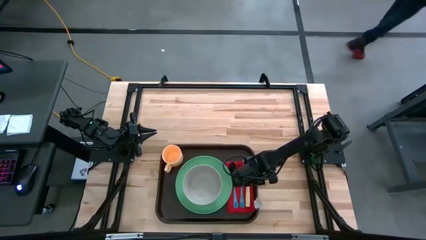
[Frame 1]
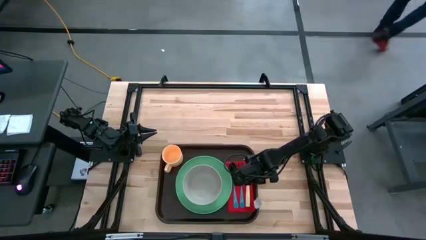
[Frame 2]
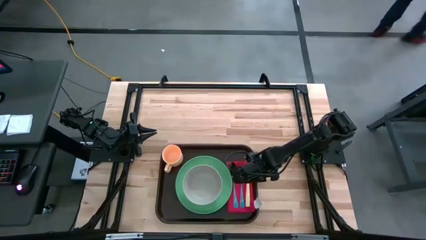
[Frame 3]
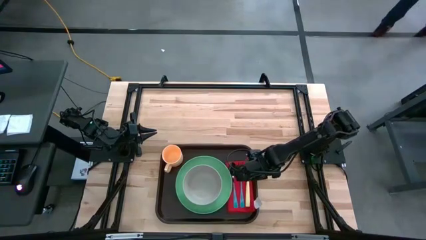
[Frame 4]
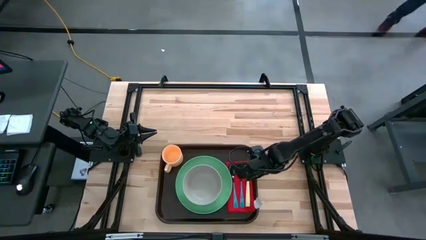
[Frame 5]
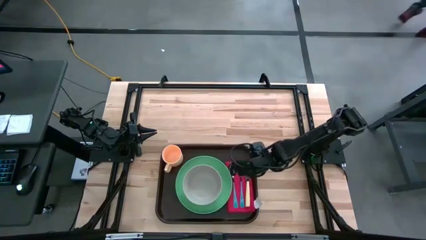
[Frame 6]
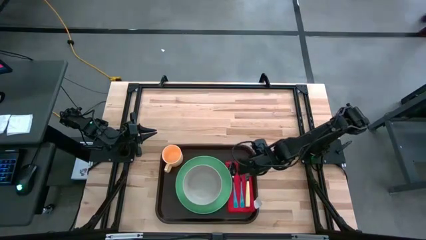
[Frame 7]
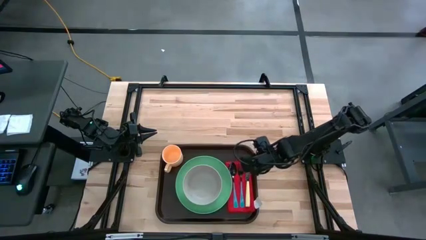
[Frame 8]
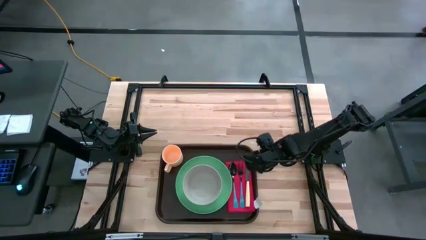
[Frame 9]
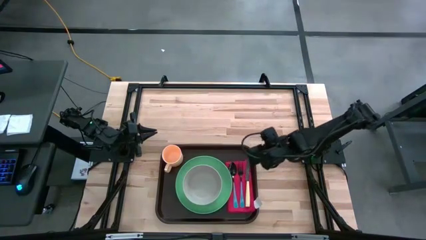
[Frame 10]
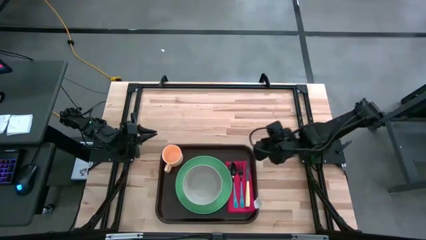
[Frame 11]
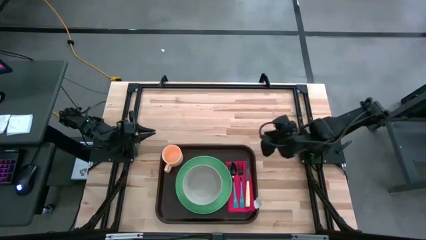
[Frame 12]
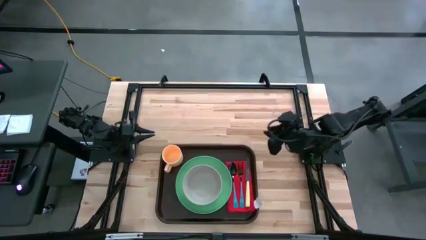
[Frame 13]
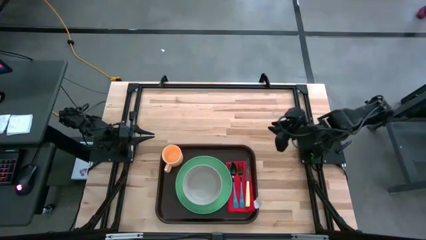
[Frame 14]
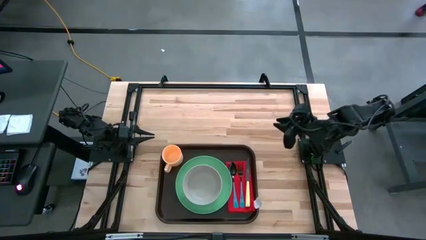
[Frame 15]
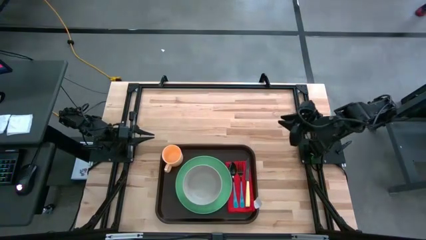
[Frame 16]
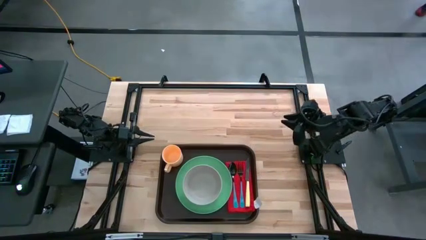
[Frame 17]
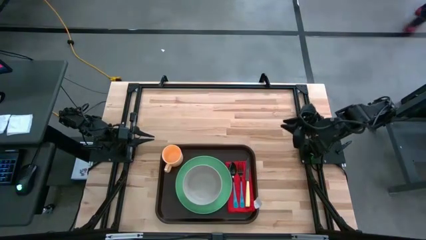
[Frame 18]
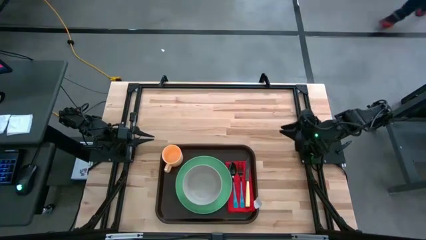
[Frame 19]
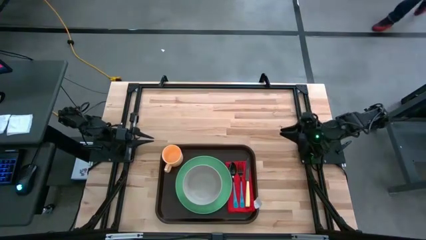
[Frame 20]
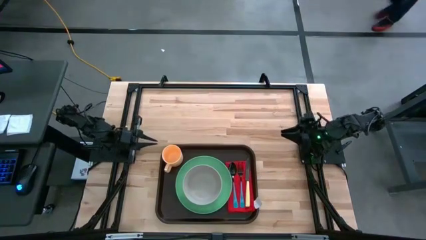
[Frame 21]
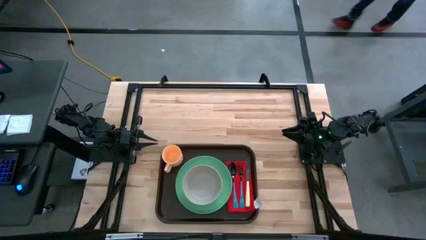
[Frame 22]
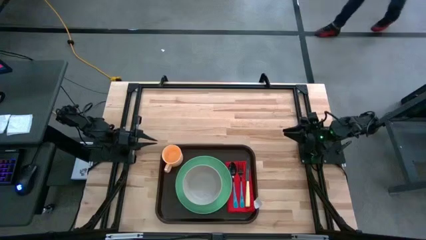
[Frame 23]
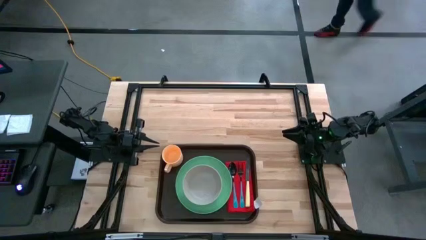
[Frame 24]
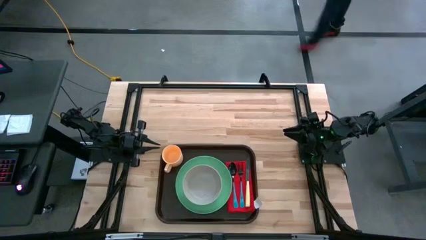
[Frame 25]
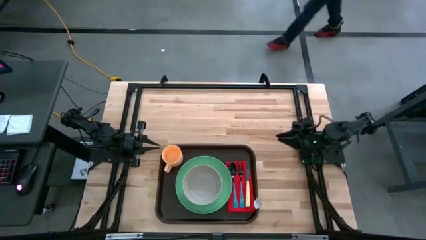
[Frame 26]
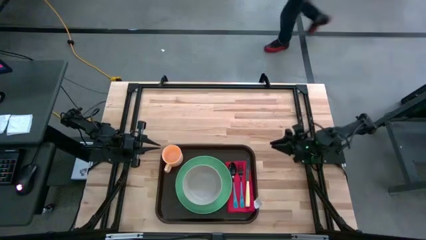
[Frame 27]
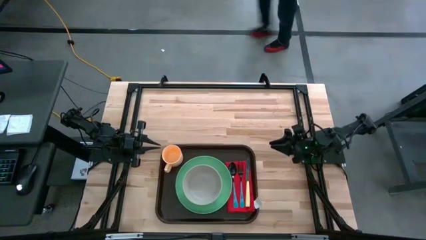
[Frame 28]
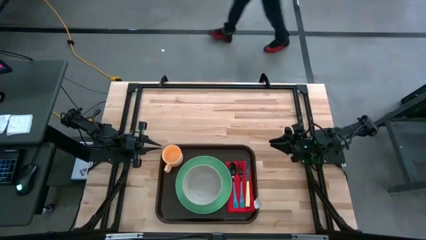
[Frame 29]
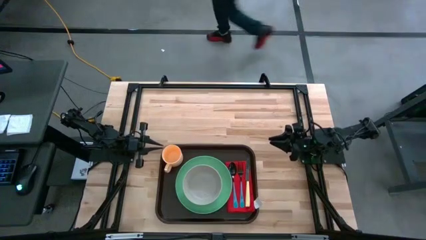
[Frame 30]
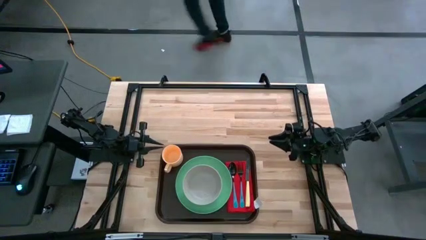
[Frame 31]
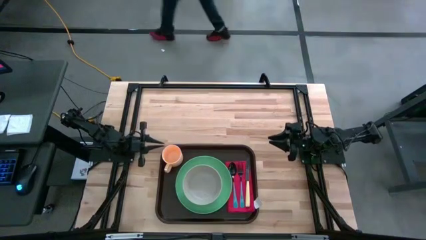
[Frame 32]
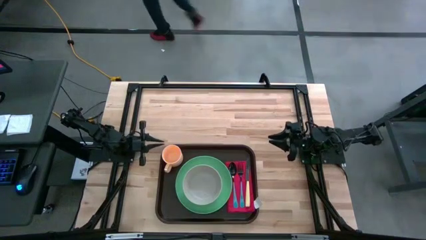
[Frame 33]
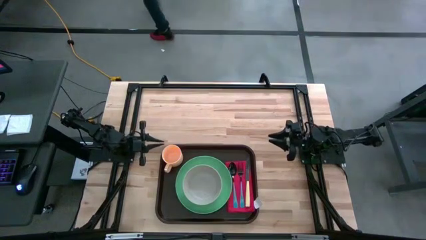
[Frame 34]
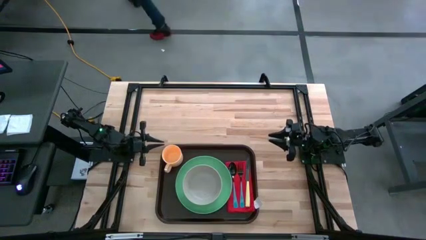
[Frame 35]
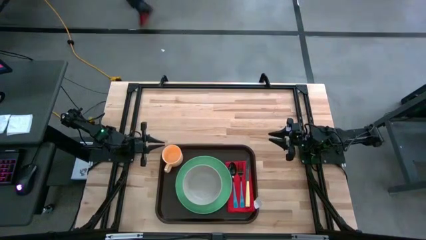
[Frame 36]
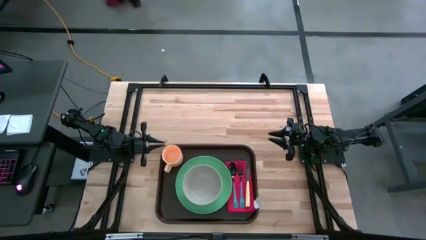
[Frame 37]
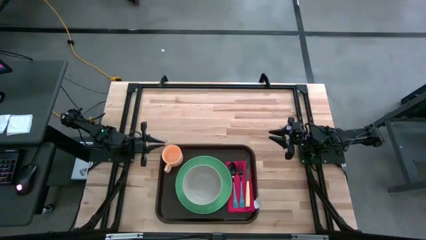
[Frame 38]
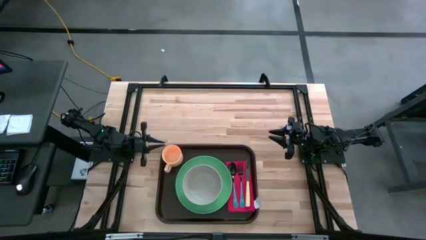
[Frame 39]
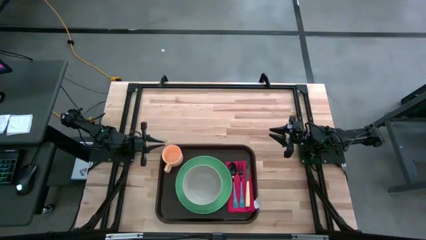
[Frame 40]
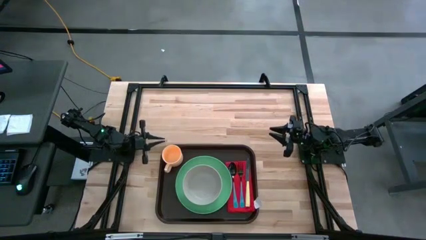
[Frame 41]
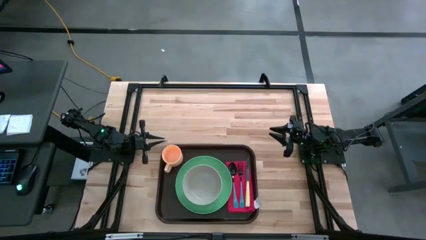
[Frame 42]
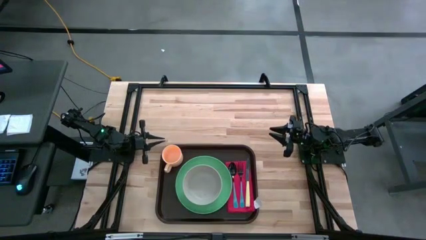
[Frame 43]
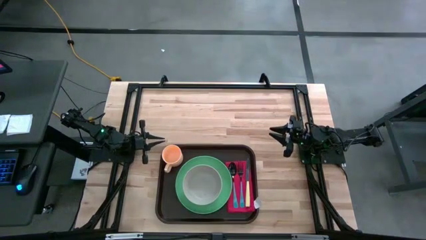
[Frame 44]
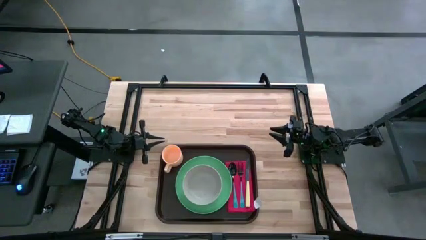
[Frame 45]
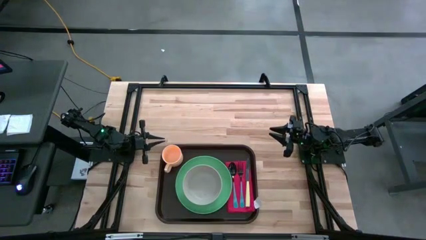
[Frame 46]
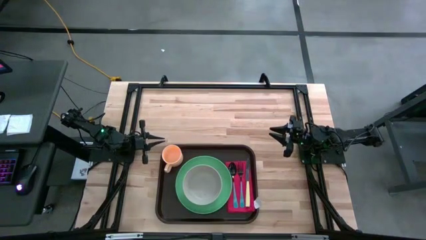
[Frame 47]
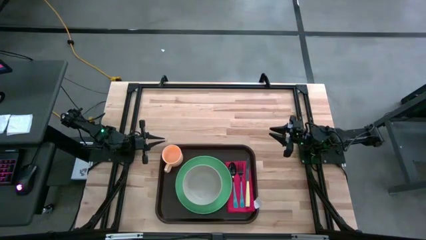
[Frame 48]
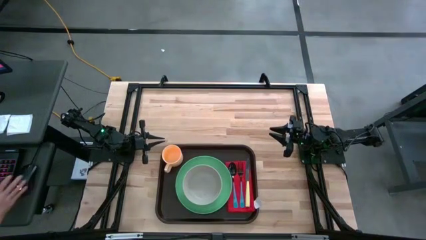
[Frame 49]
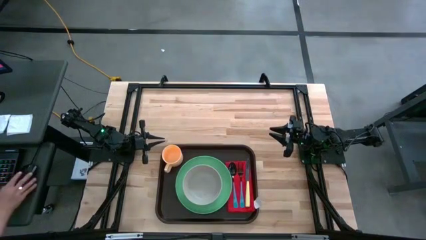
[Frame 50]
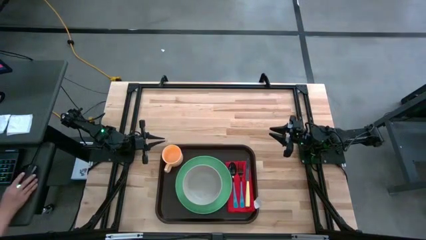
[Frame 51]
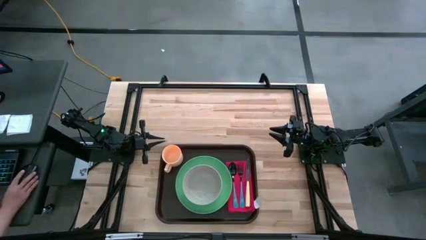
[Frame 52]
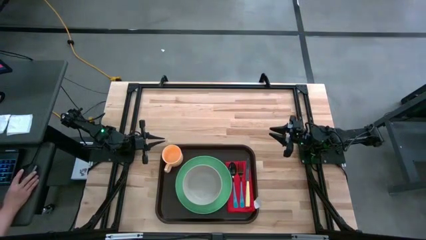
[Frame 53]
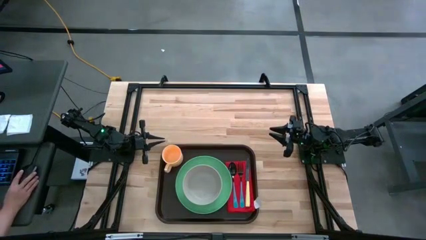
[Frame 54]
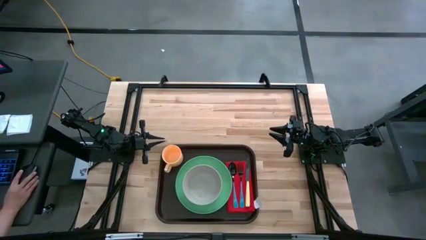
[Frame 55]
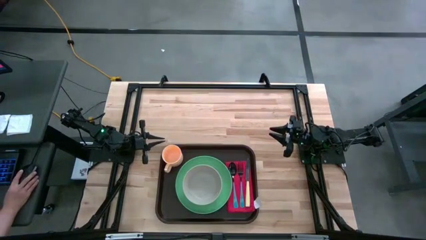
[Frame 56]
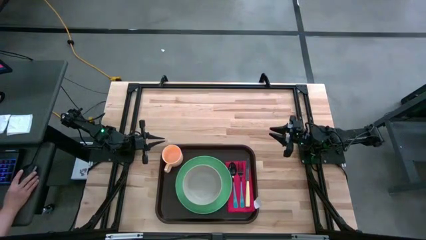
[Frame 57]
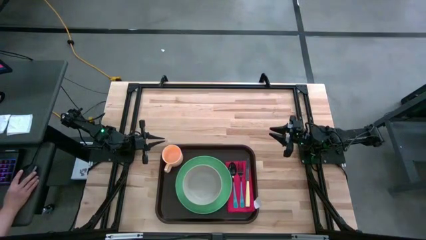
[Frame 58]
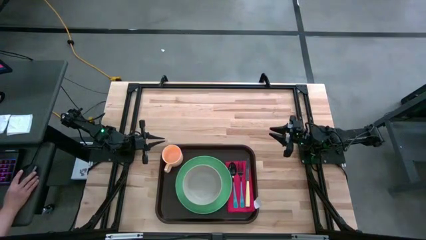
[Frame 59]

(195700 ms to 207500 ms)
Task: Set up tray
Return to Home Position

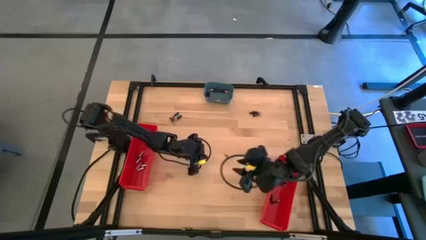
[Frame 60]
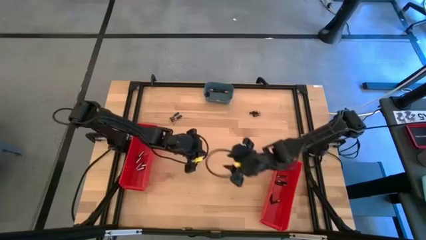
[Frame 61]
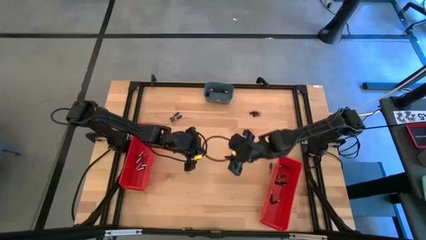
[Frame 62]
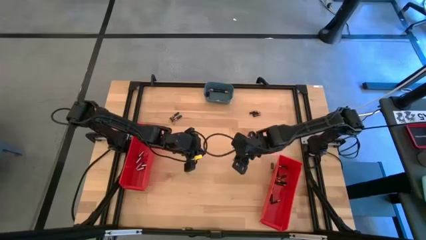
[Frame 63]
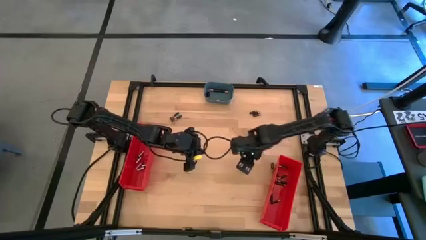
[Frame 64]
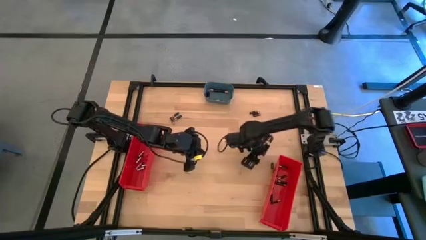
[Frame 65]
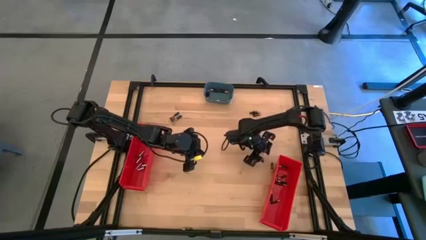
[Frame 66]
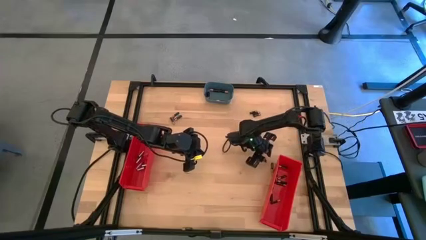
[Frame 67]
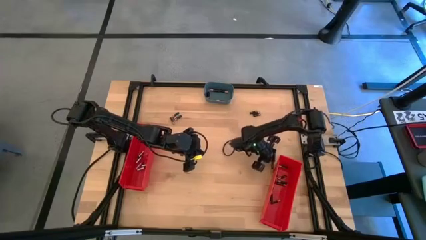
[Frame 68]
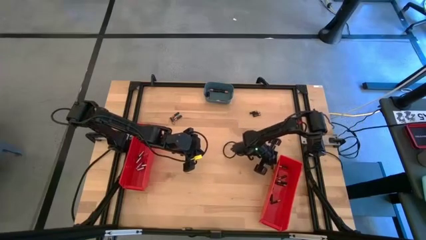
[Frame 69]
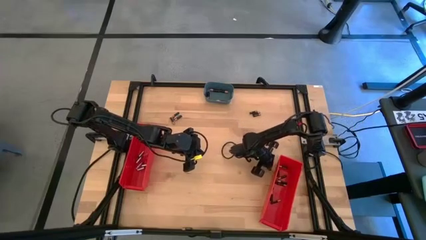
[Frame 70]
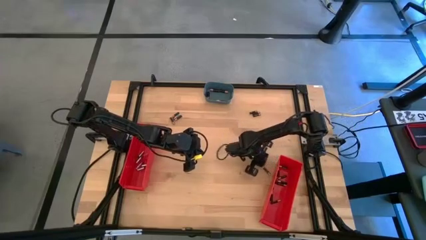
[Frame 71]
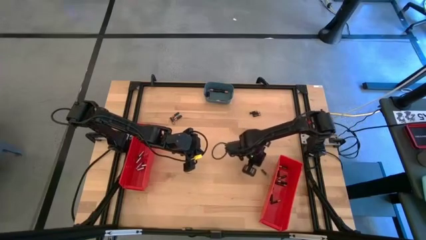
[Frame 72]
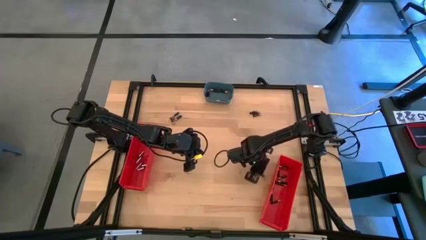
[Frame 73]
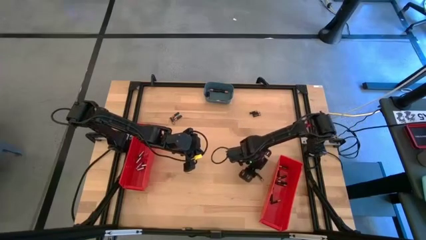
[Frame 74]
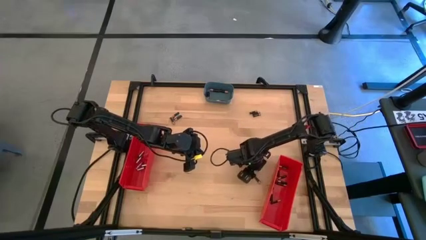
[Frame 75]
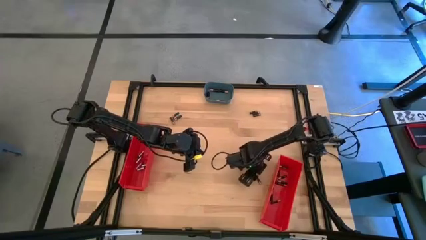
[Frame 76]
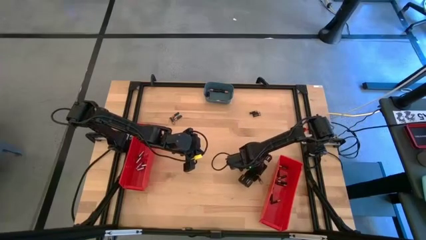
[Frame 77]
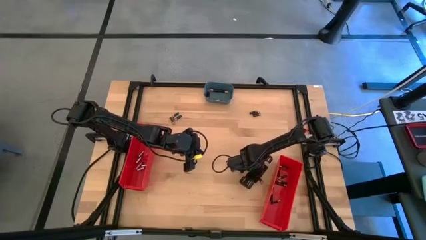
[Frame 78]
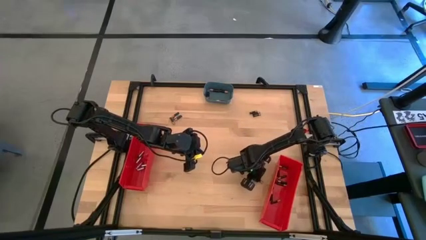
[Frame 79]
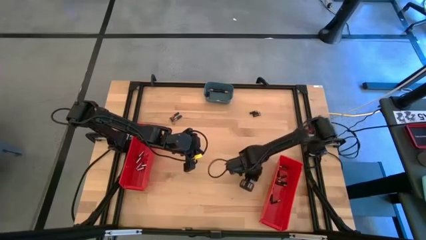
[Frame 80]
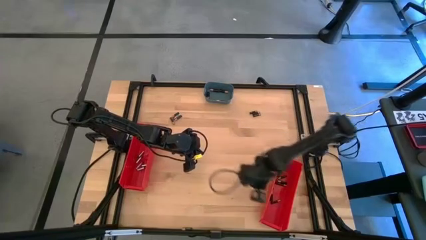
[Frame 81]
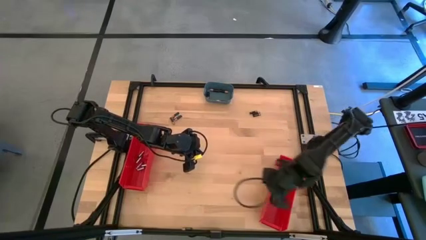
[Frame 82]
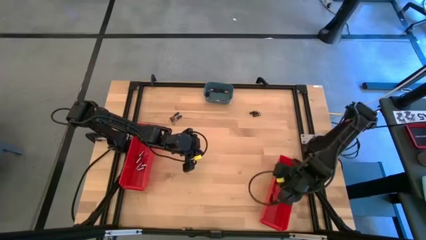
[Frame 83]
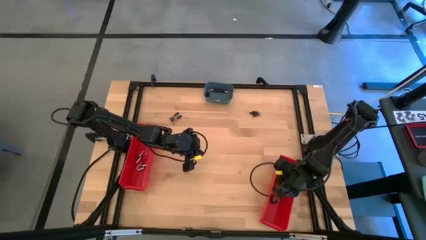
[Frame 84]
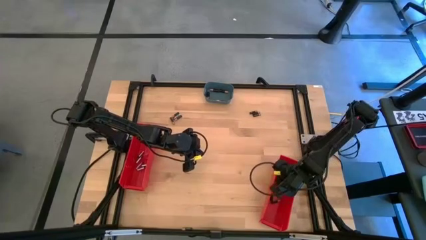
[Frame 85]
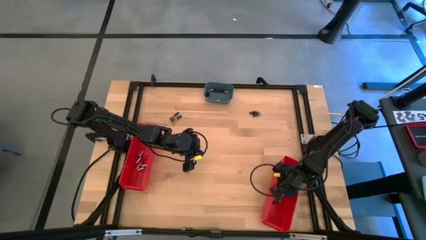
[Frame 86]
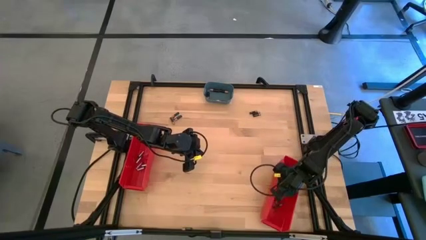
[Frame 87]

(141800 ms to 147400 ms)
Task: Sort batteries
Put the small brown battery into the right red bin
